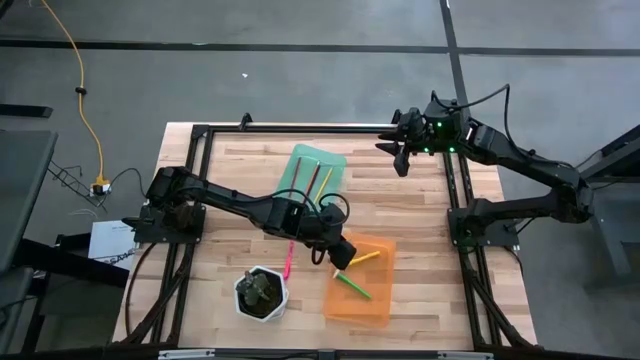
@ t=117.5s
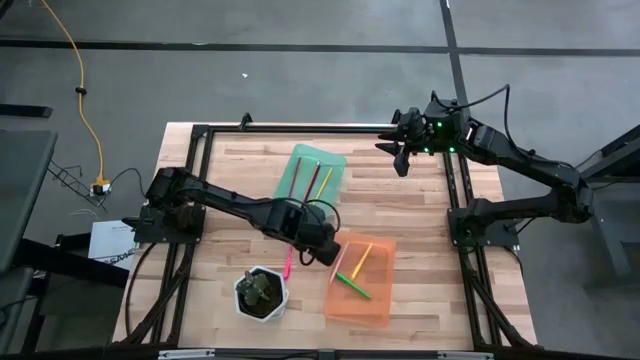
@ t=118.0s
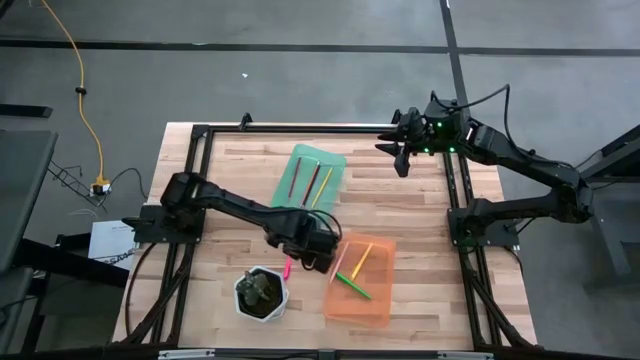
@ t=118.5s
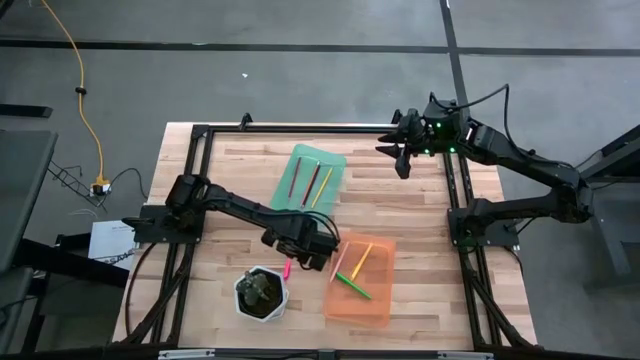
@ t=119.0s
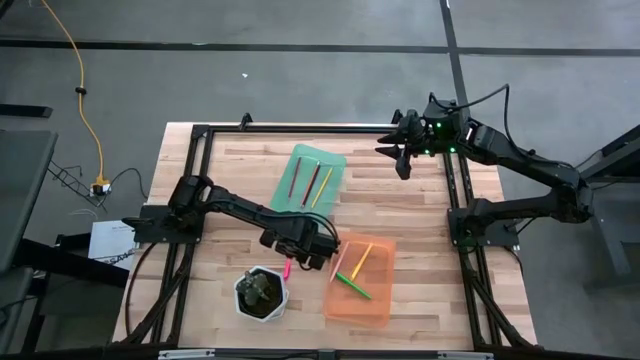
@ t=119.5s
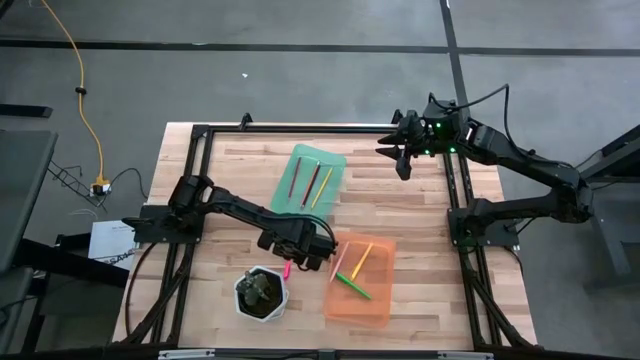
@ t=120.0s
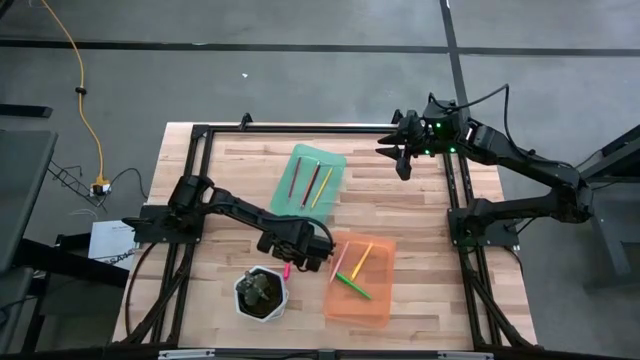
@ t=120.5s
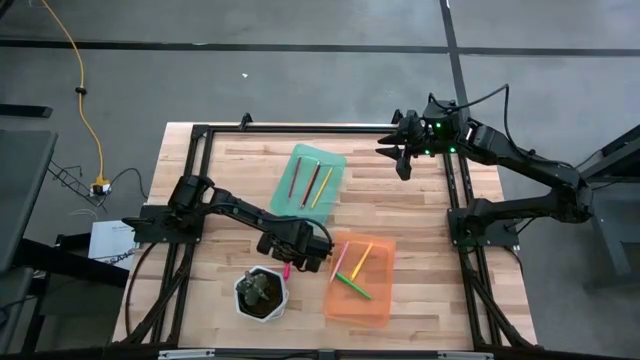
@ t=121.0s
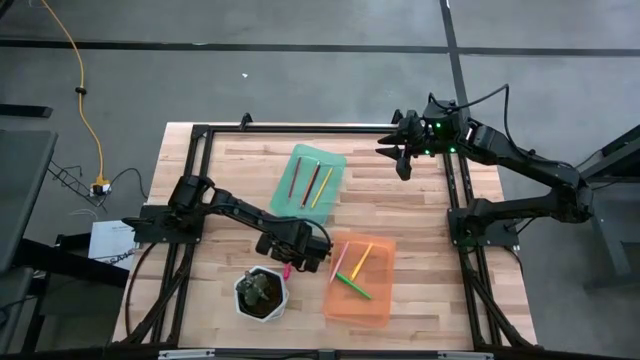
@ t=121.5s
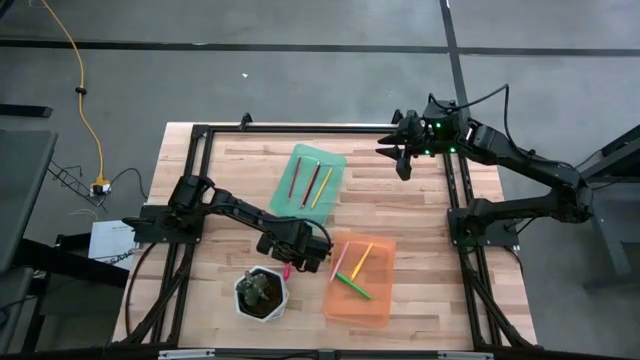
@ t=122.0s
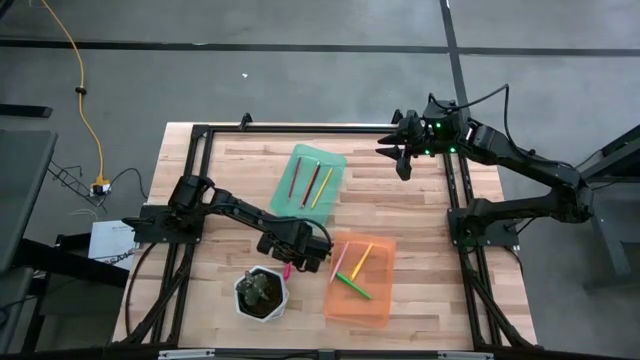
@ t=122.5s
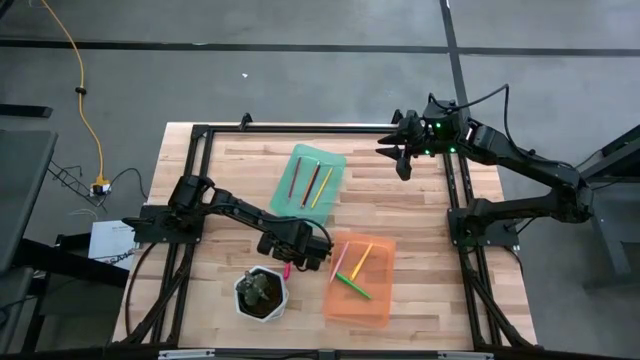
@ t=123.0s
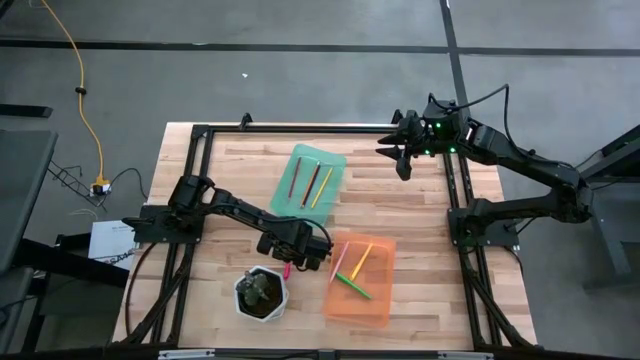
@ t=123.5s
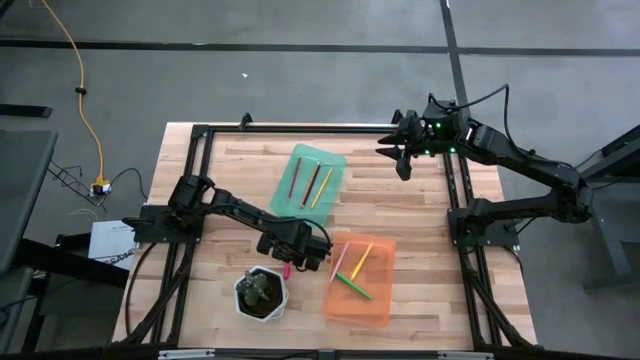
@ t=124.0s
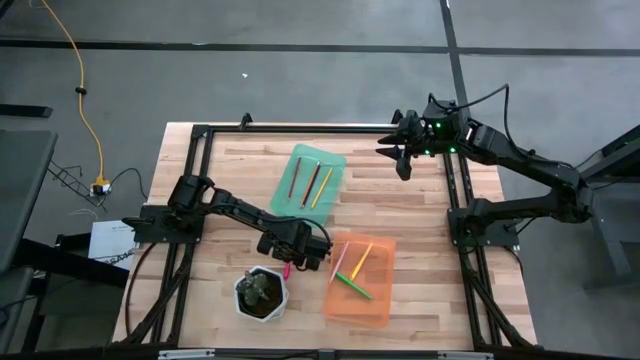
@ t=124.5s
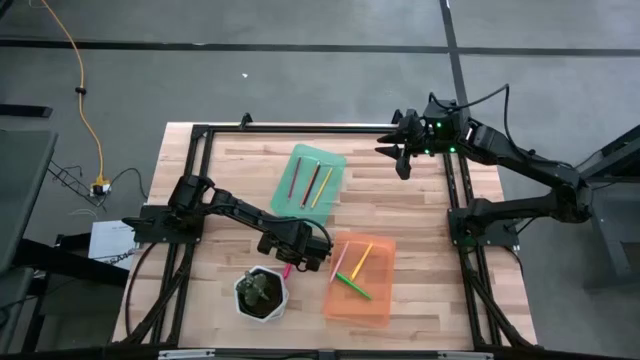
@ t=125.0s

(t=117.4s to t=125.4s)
Task: Sort pens & pencils
Put the pink pen into the orange bin

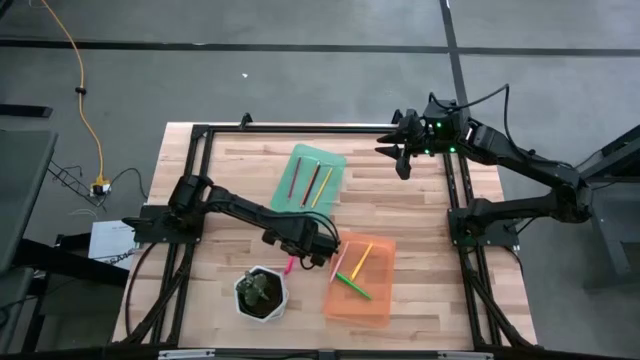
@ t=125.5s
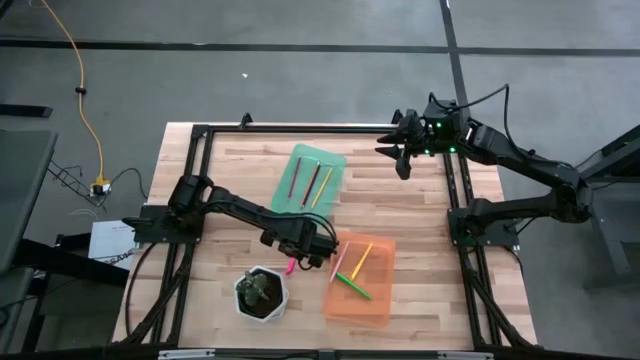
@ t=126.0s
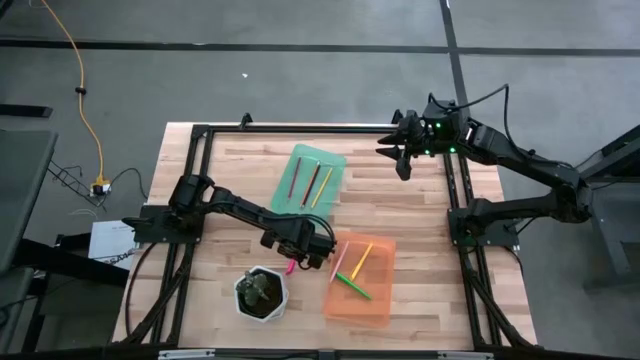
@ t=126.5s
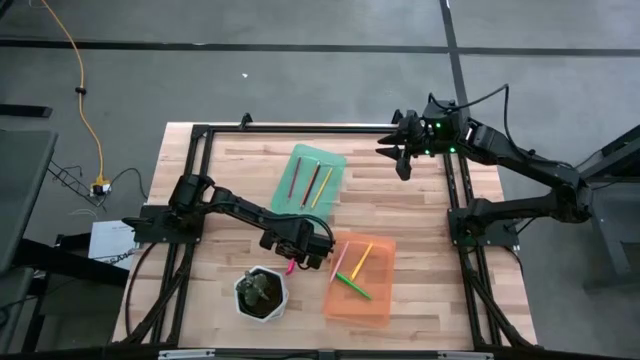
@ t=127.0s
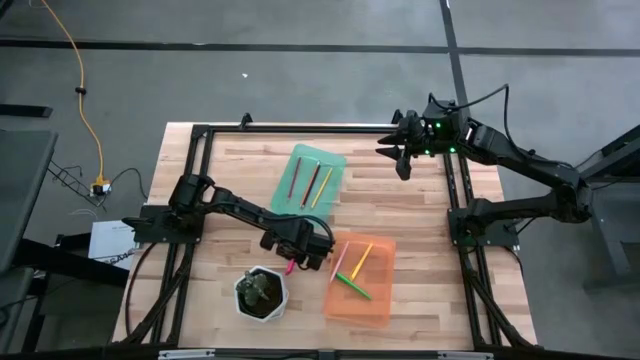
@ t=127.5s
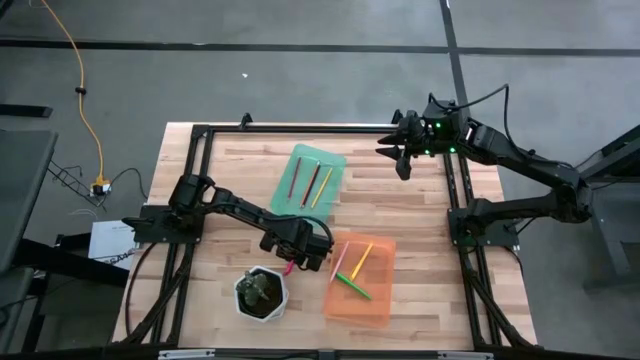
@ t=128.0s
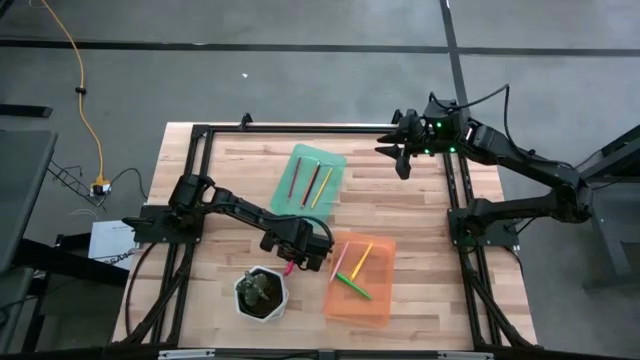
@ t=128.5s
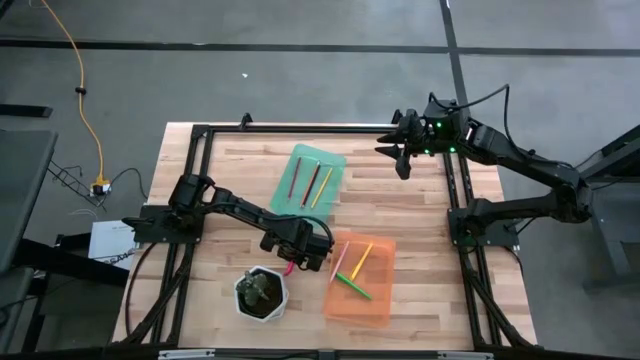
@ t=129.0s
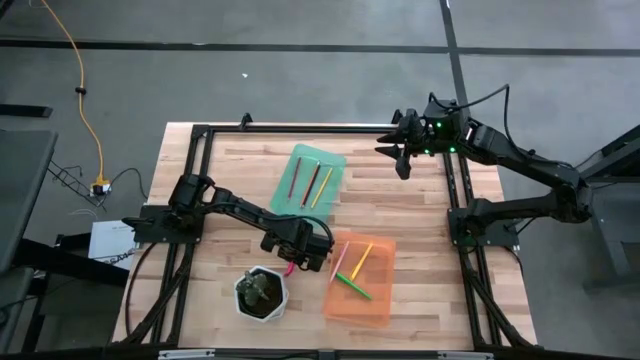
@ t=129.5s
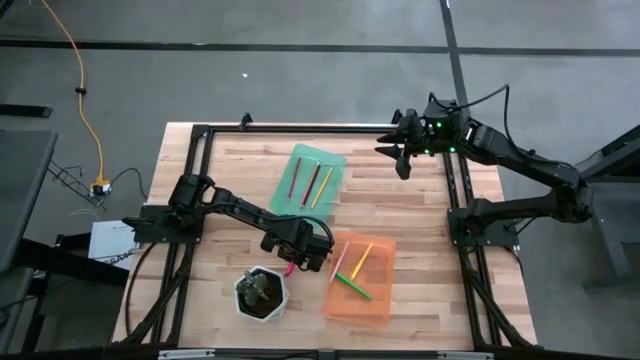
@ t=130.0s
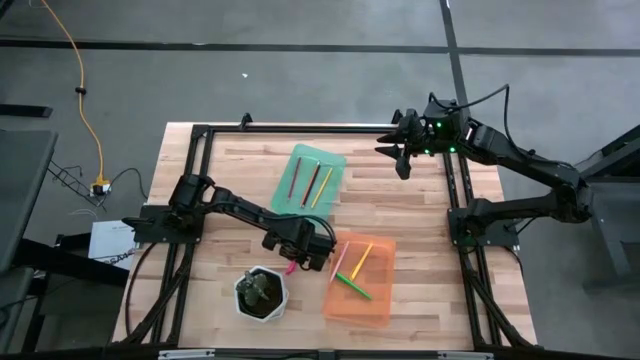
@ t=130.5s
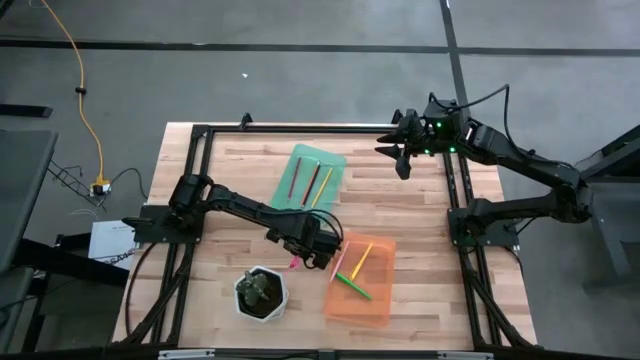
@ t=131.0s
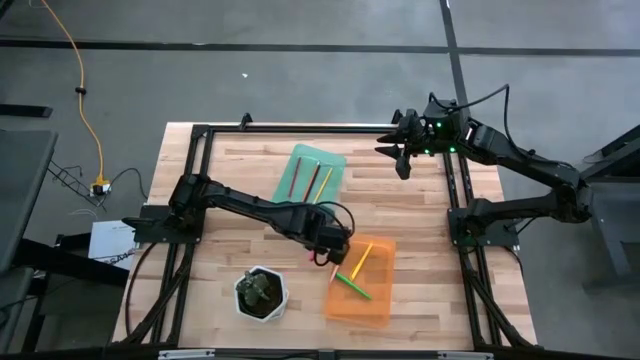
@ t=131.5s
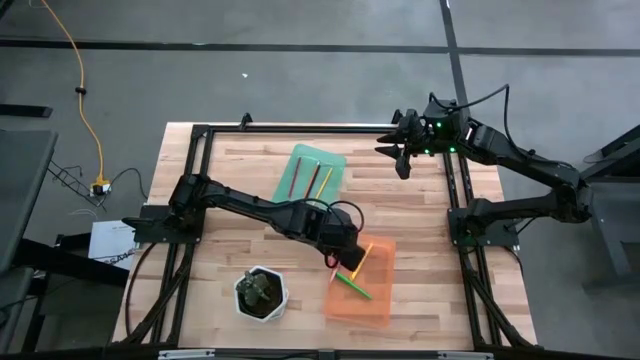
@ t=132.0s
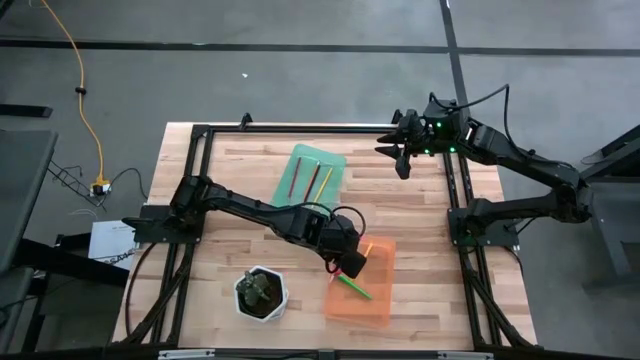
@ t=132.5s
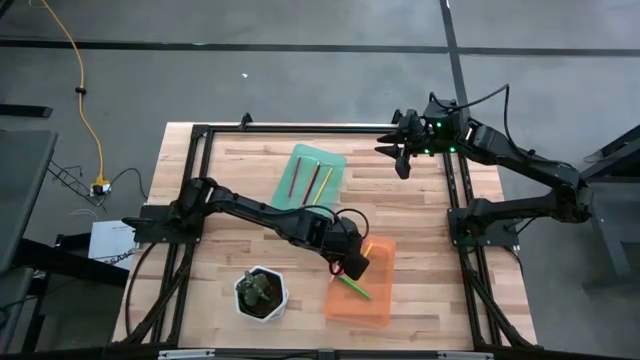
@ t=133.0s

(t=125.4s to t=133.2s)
Put the pink pen into the orange bin
